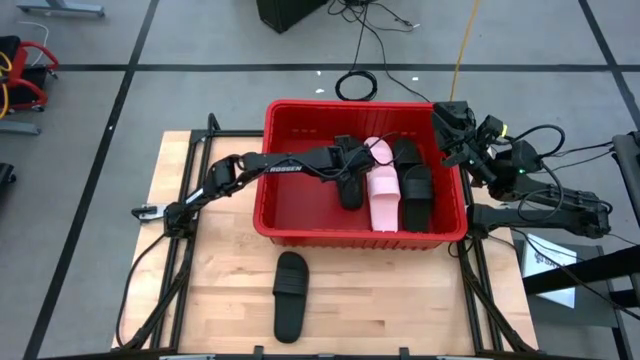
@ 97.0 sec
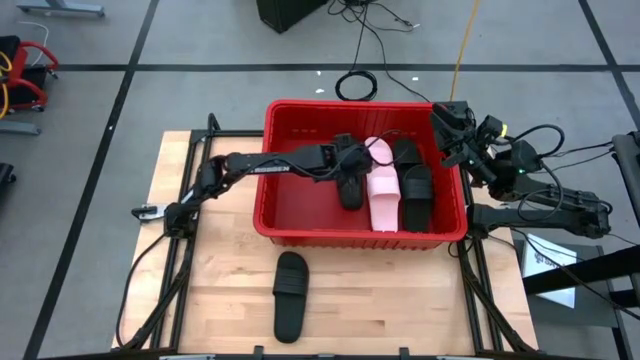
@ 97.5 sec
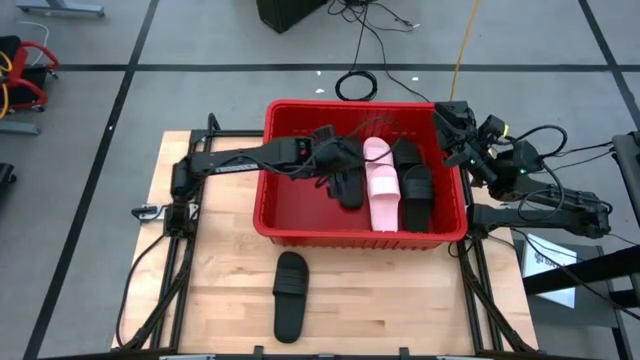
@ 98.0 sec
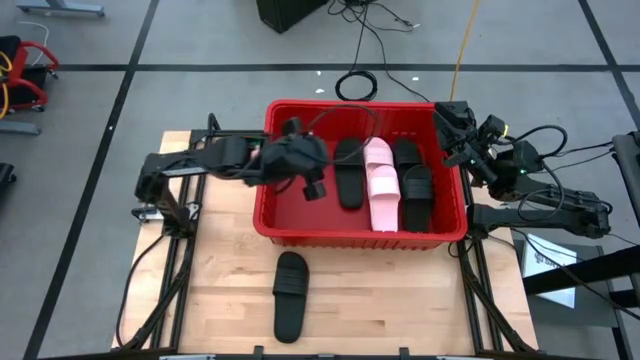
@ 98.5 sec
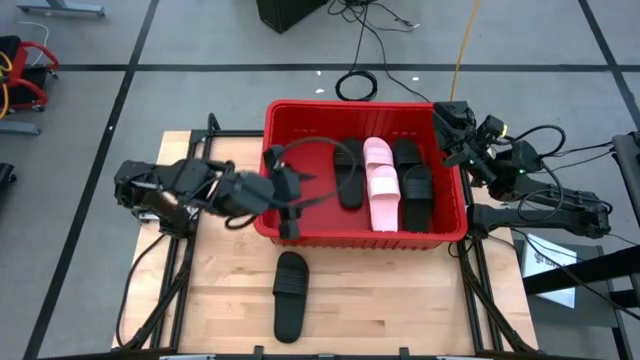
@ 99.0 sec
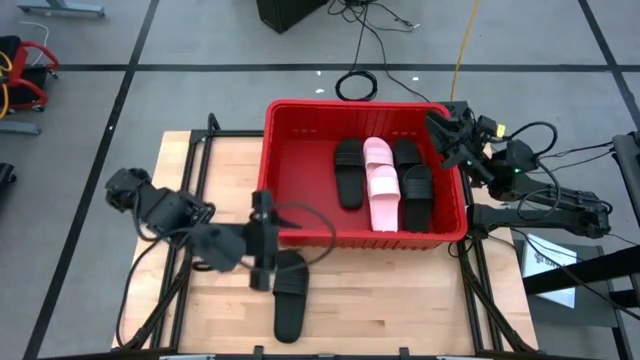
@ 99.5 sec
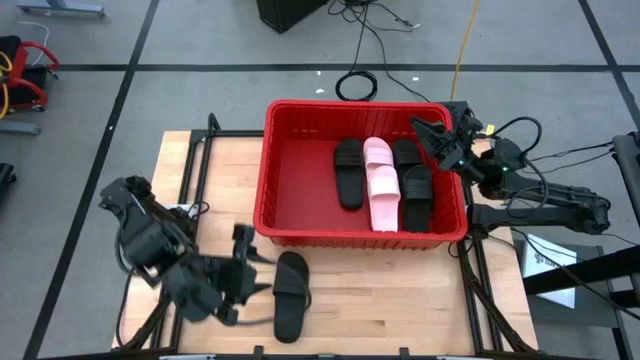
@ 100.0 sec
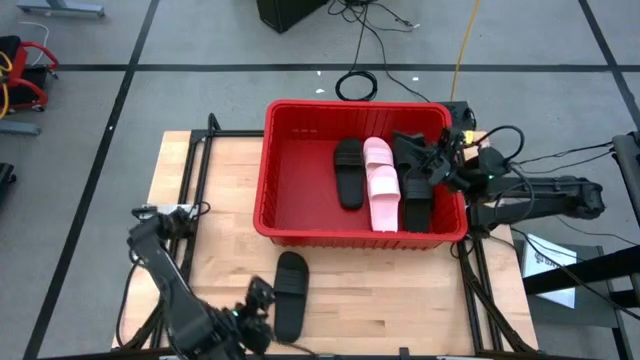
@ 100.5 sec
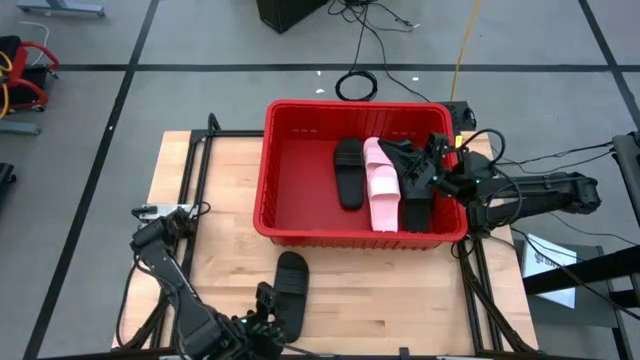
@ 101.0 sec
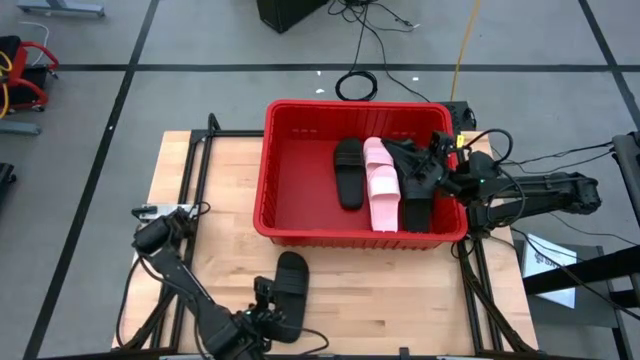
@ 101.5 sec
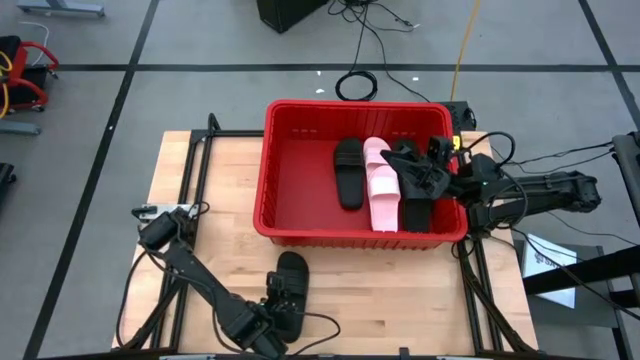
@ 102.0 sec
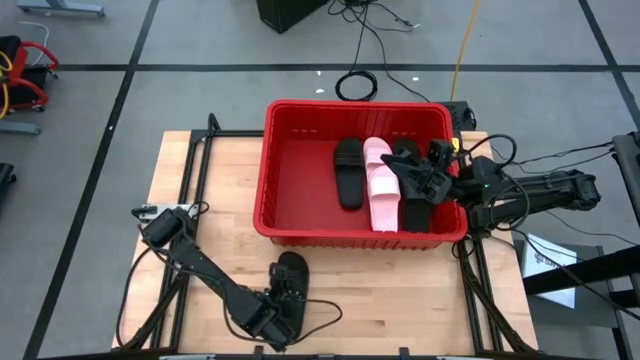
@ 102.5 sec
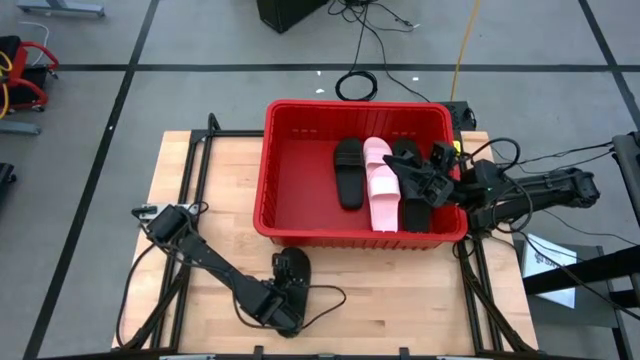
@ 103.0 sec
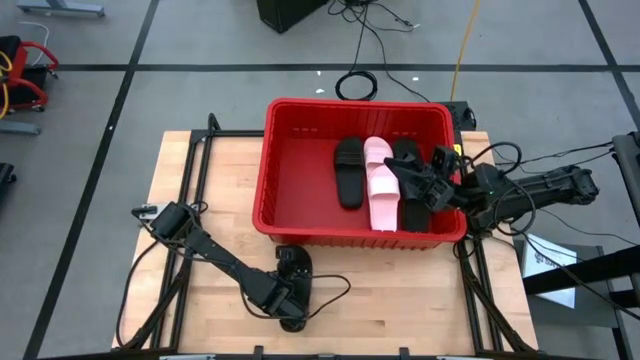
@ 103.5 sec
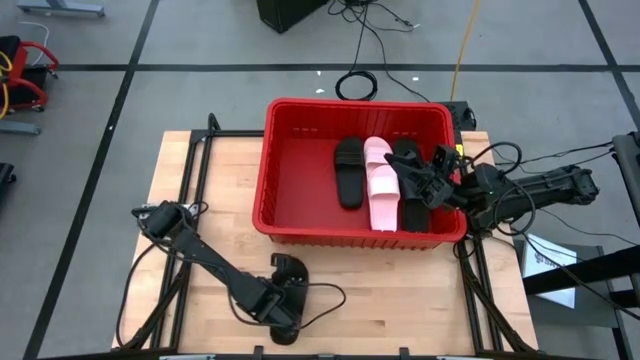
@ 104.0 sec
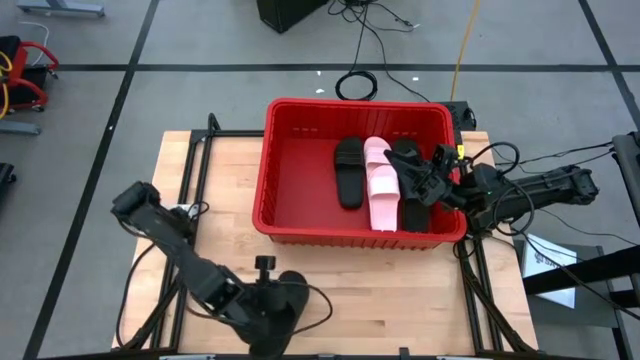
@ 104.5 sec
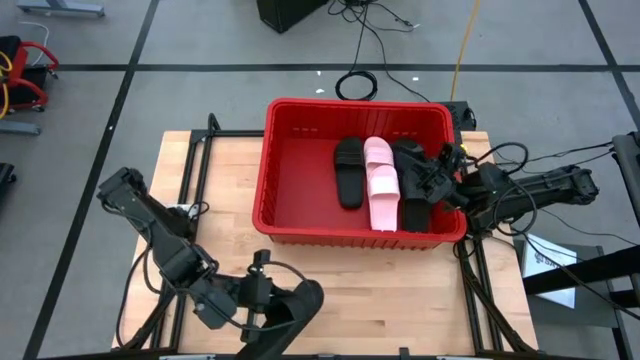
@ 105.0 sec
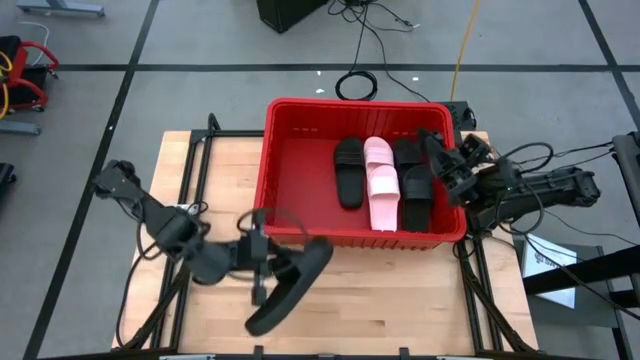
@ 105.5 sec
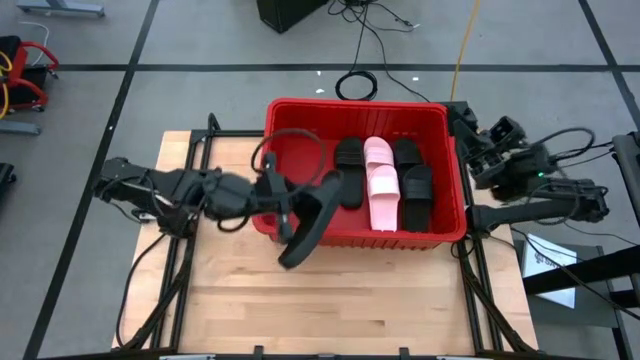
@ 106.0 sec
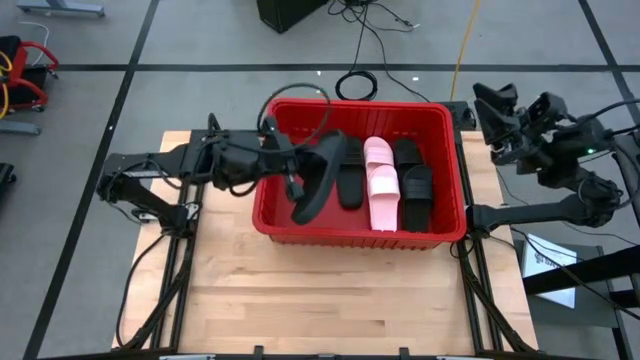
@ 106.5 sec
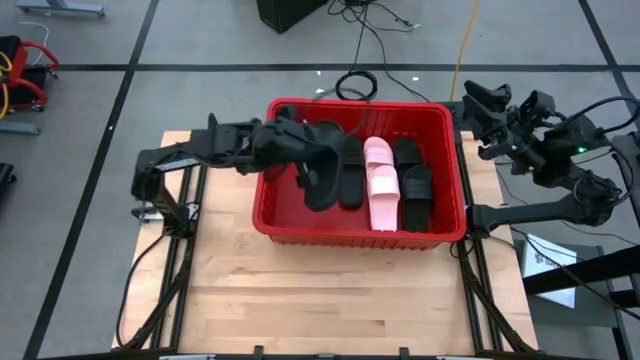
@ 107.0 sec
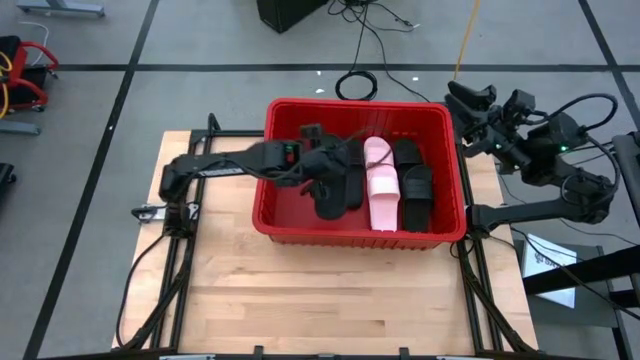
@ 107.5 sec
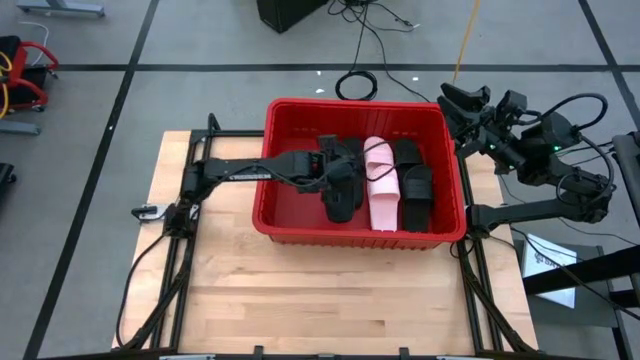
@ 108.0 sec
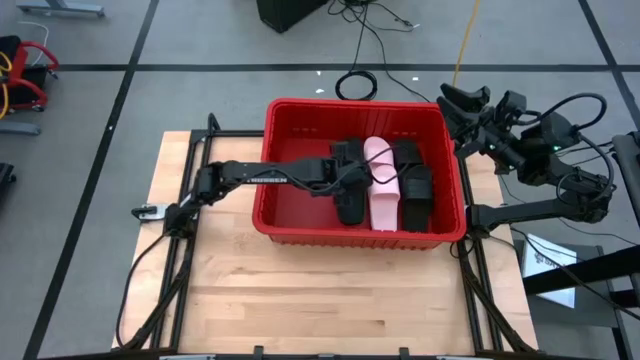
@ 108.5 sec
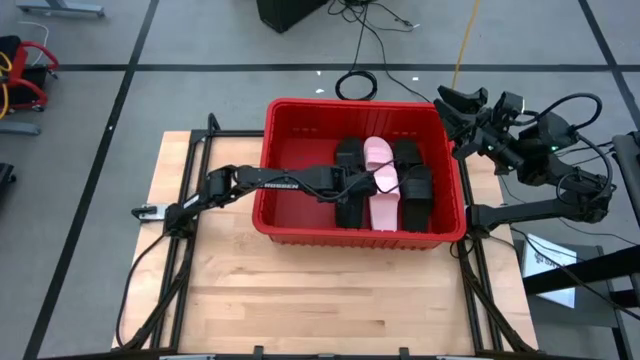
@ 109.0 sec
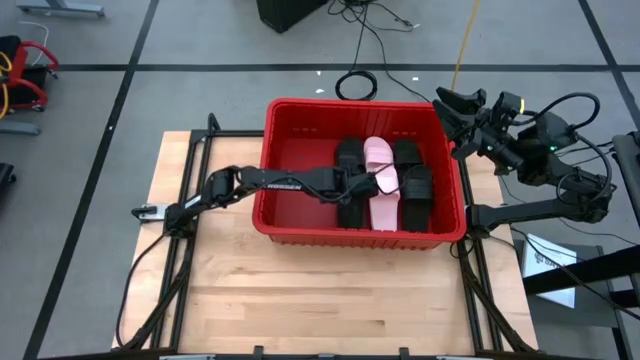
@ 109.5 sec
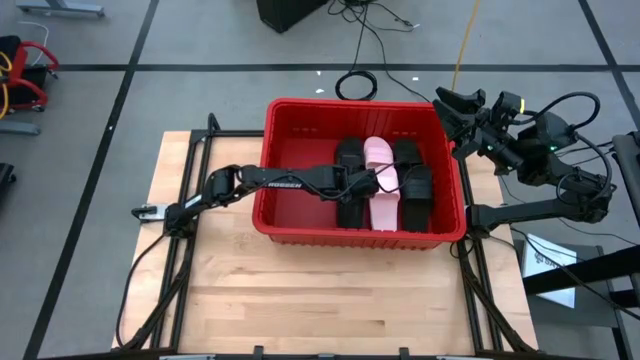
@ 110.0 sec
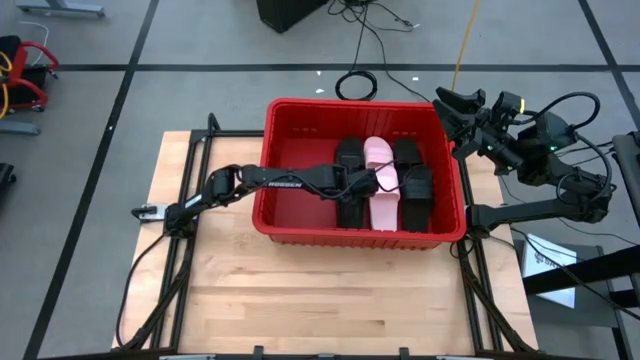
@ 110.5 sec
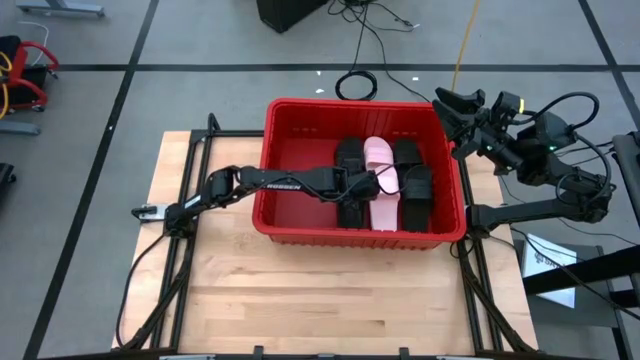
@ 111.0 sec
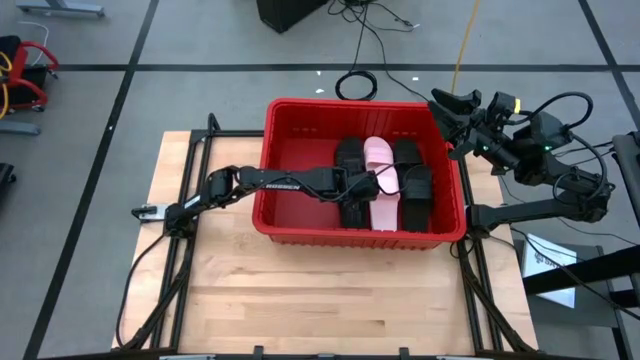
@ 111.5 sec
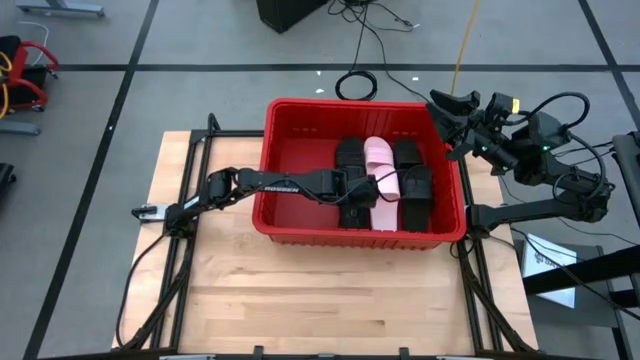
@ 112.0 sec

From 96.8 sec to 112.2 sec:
Task: Pick and place slides into bin
Put the black slipper into the red bin

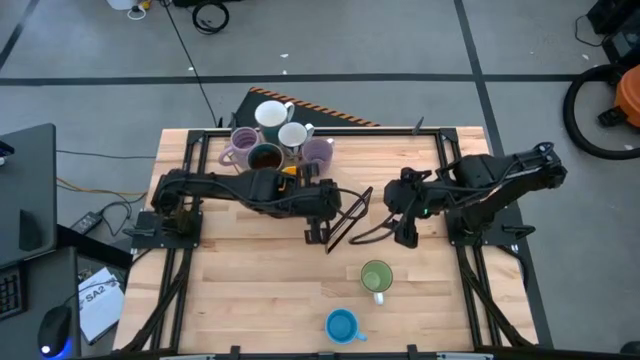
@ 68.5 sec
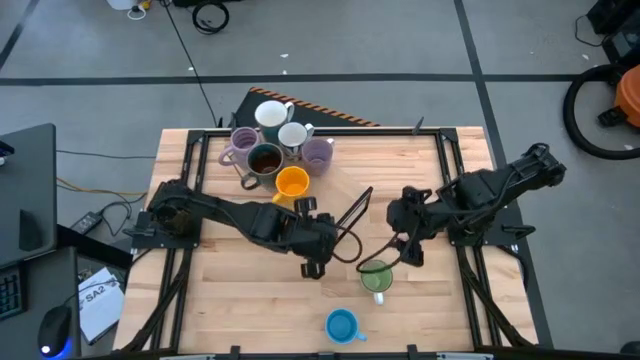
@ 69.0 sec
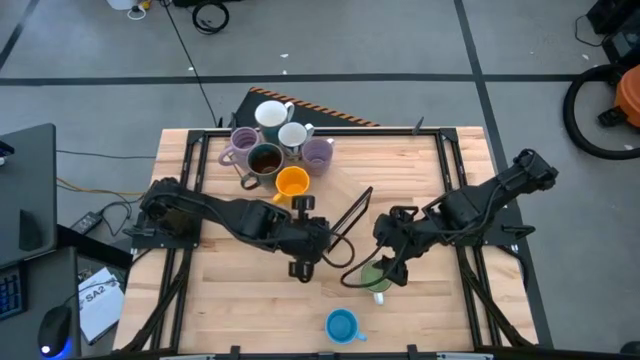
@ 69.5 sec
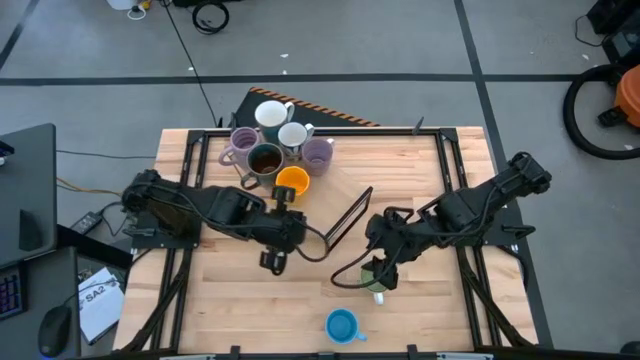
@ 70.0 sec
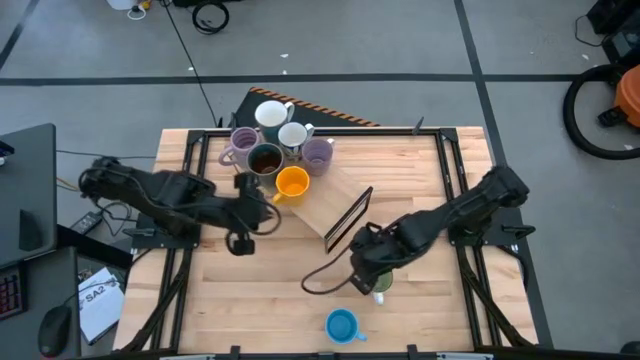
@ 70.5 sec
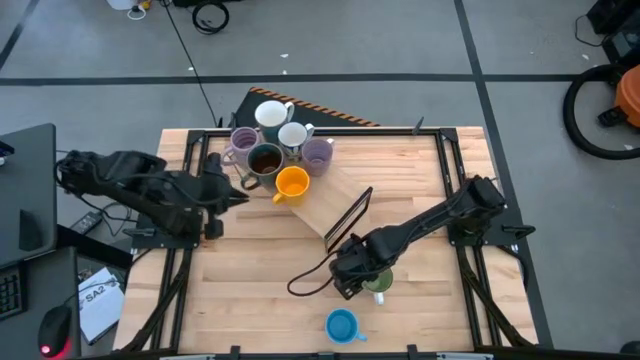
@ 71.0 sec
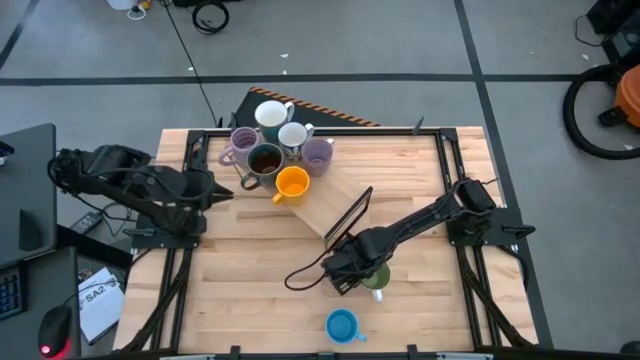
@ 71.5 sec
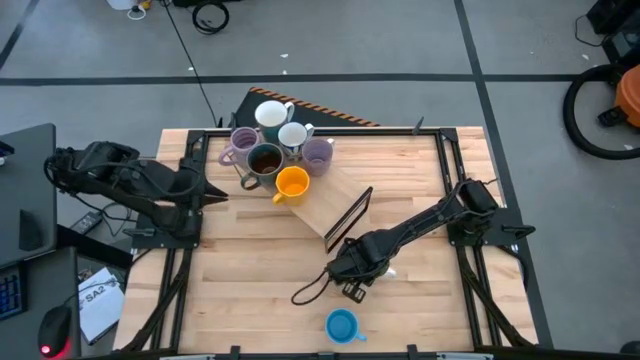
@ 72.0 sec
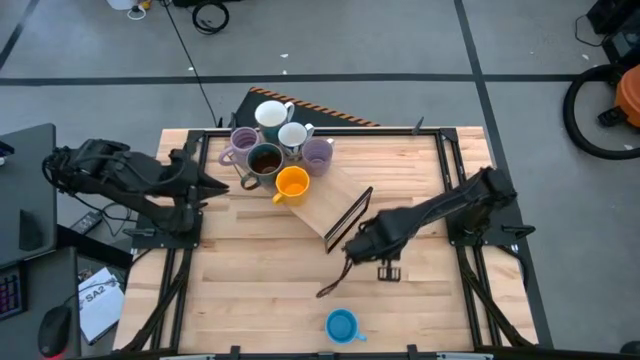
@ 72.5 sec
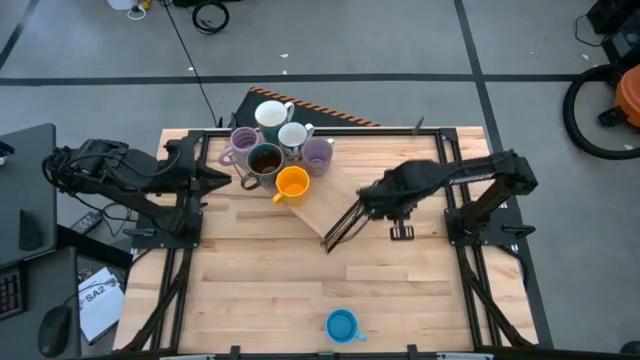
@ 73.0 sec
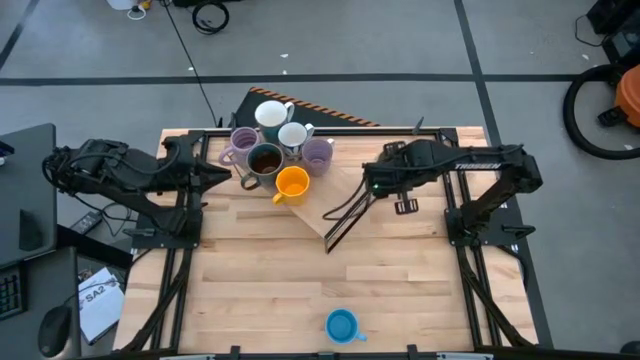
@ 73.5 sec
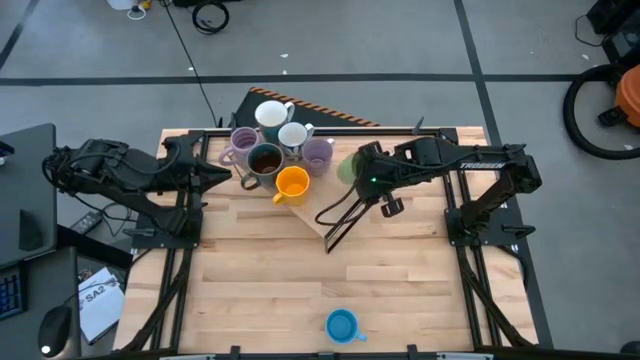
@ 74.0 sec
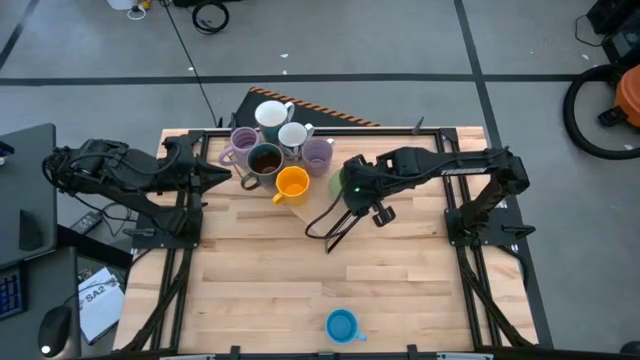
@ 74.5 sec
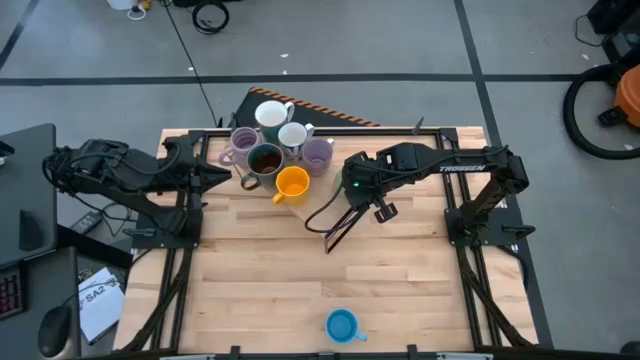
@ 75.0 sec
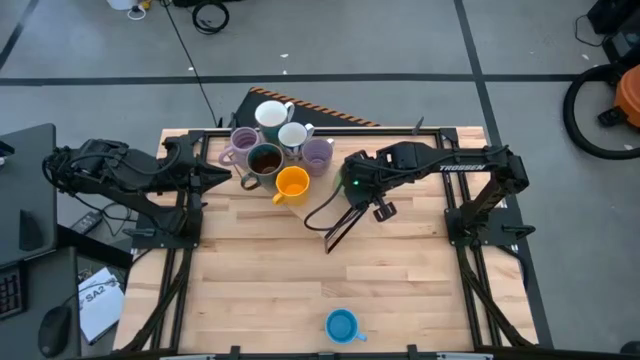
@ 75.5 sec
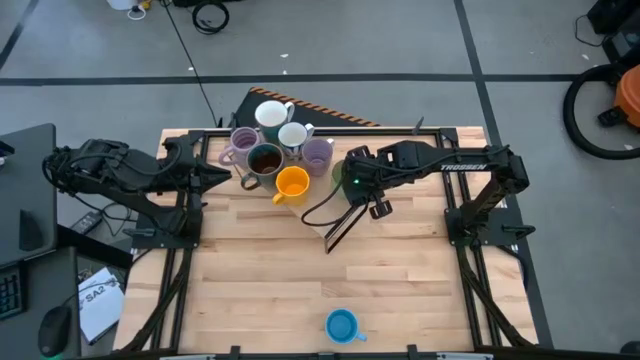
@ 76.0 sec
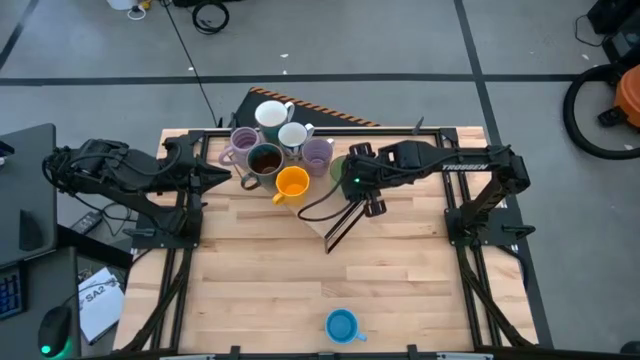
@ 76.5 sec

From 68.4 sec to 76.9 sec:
Task: Place coffee mugs
Put the green mug on the shelf
